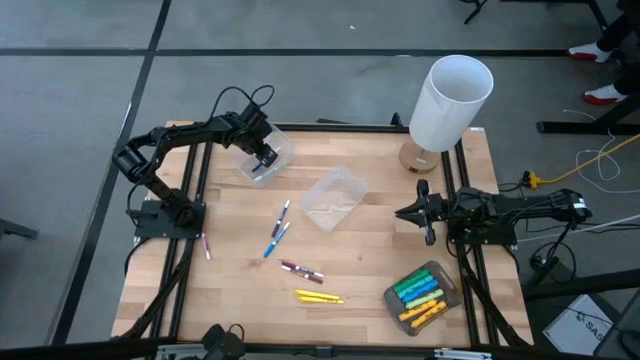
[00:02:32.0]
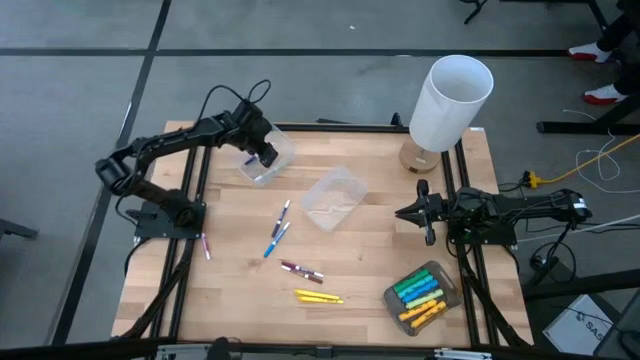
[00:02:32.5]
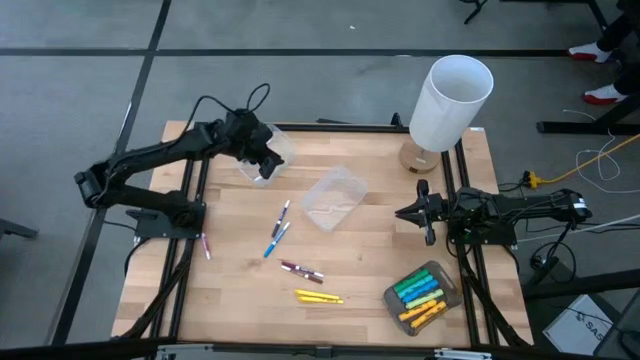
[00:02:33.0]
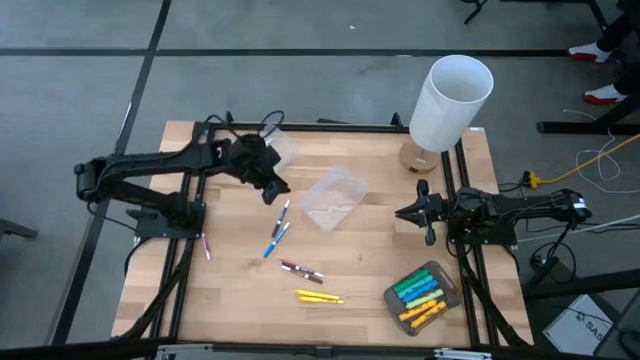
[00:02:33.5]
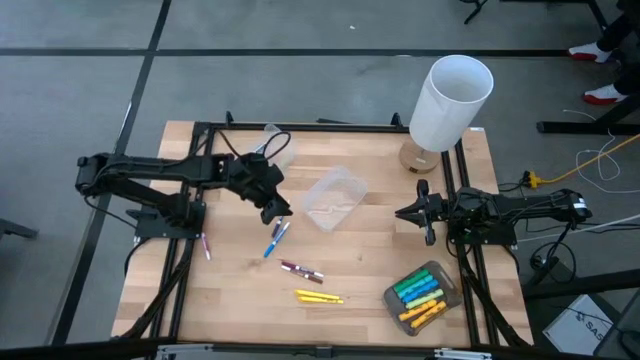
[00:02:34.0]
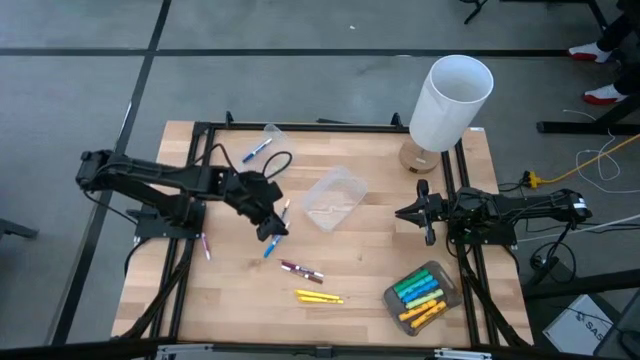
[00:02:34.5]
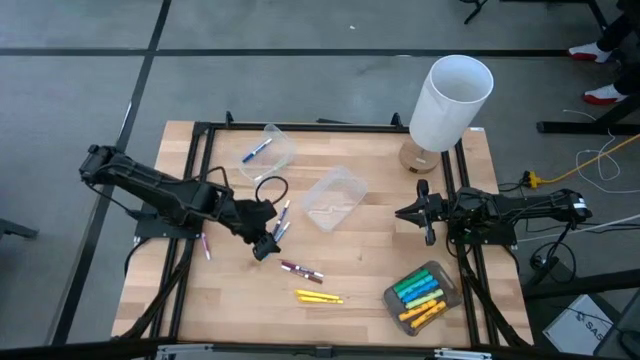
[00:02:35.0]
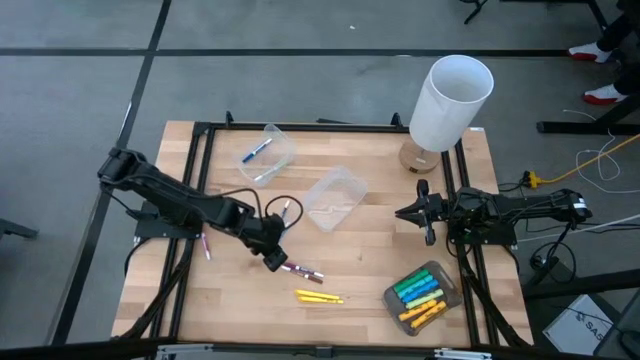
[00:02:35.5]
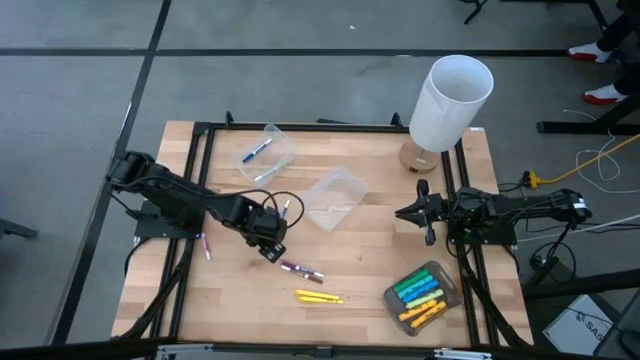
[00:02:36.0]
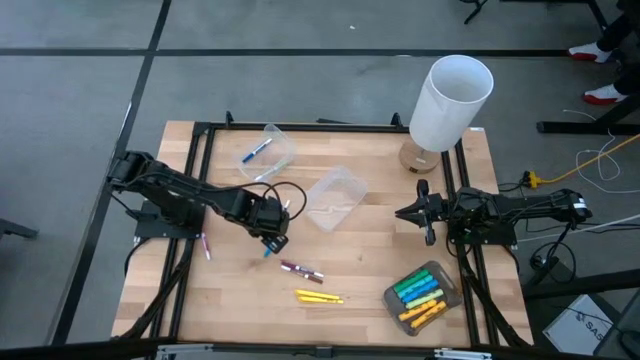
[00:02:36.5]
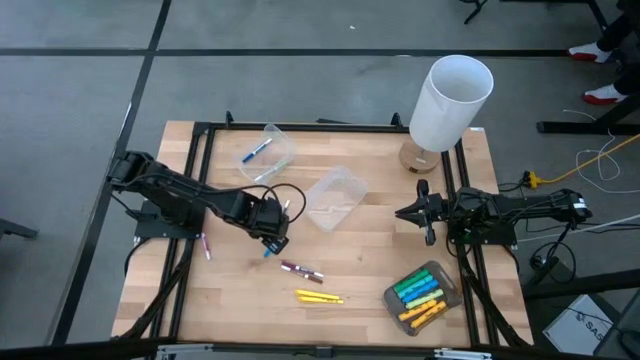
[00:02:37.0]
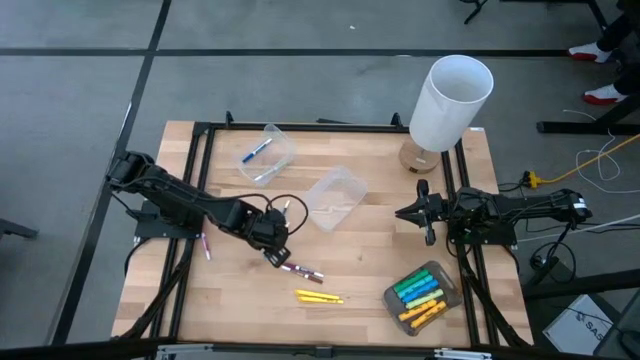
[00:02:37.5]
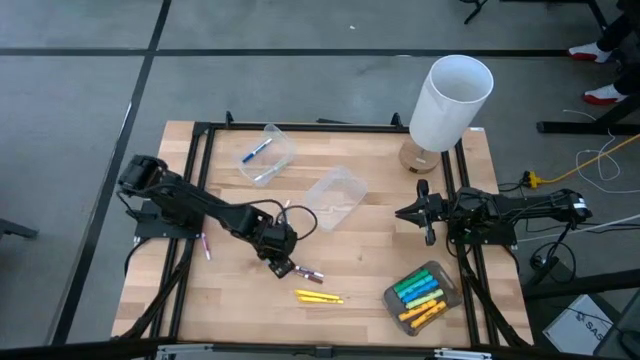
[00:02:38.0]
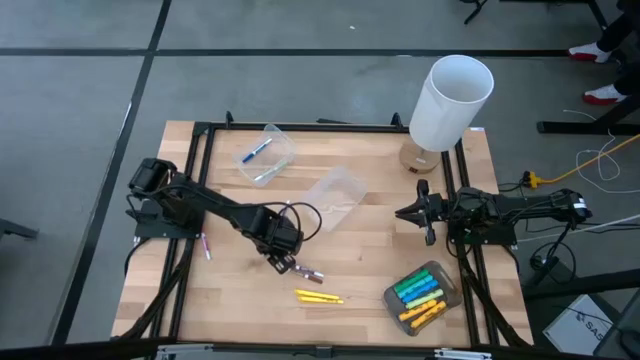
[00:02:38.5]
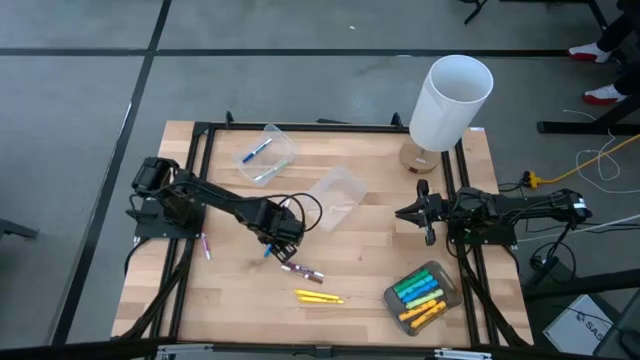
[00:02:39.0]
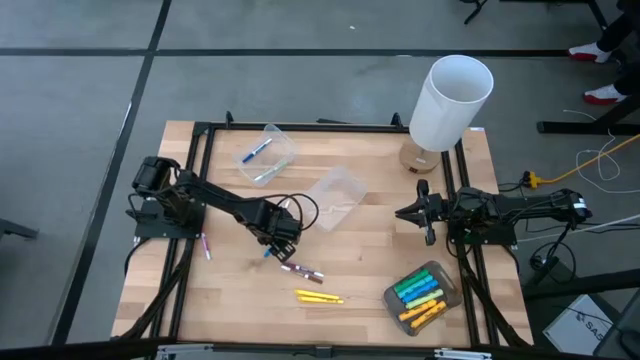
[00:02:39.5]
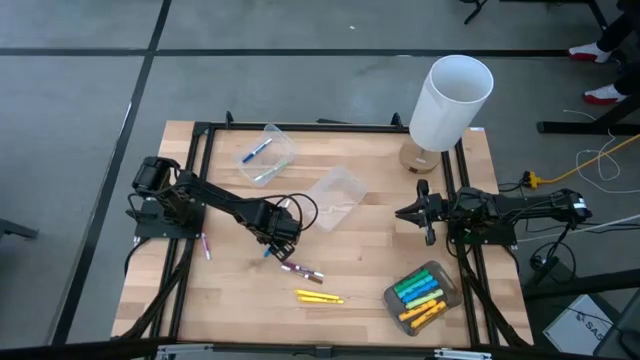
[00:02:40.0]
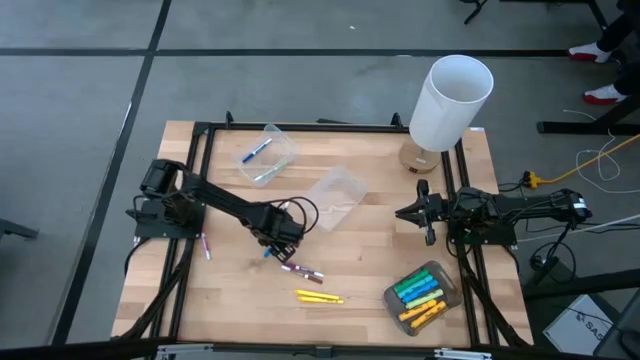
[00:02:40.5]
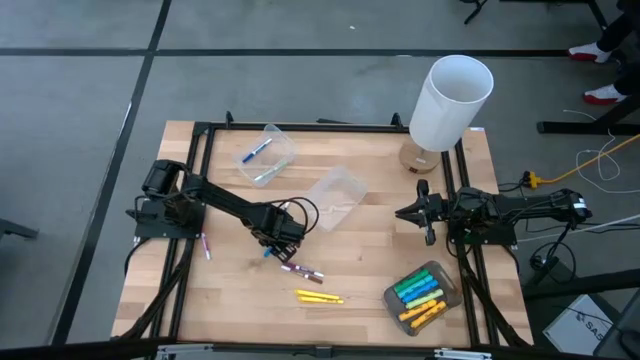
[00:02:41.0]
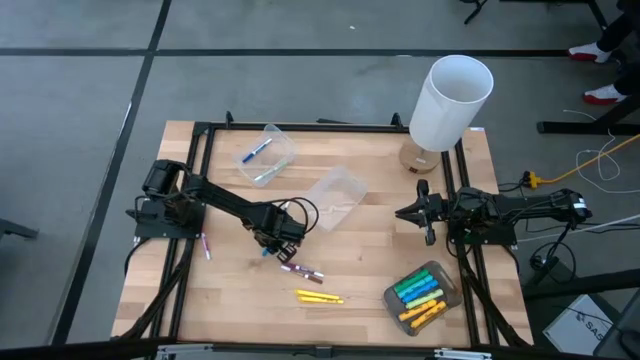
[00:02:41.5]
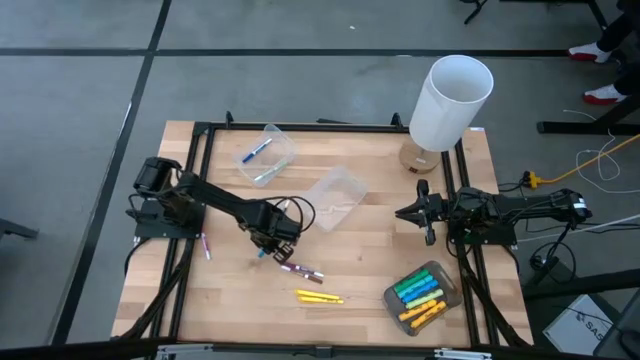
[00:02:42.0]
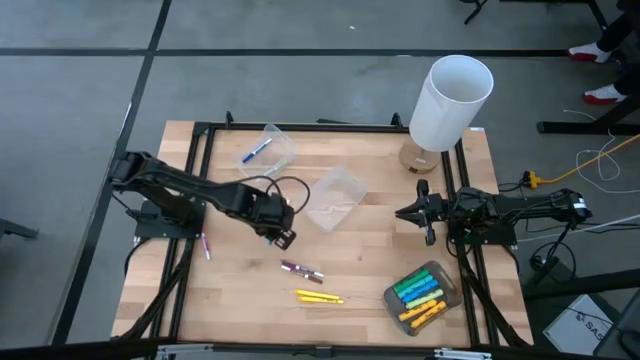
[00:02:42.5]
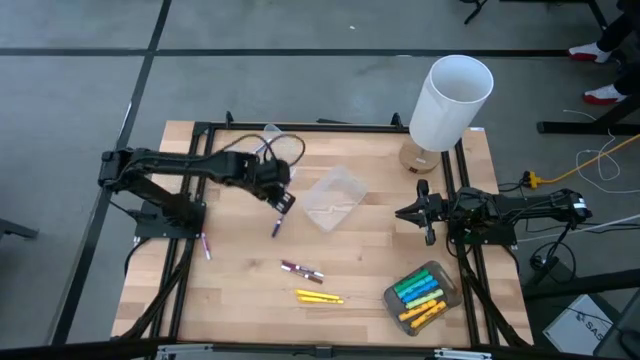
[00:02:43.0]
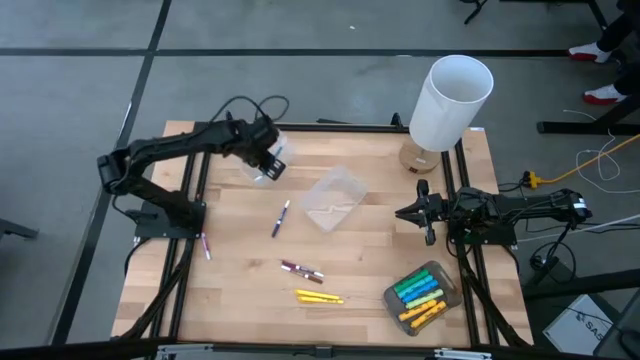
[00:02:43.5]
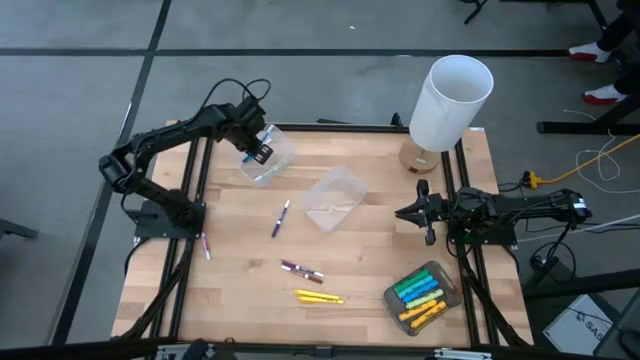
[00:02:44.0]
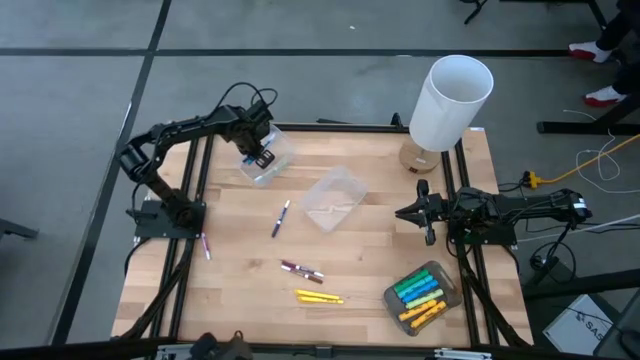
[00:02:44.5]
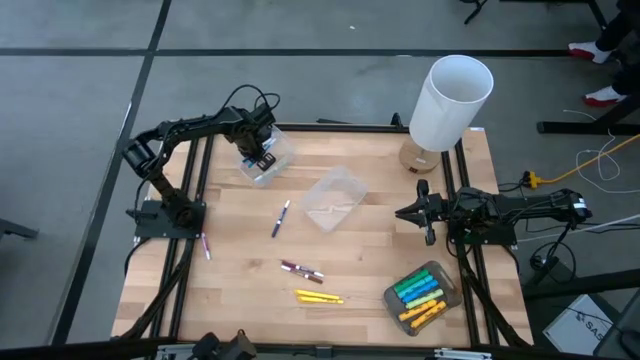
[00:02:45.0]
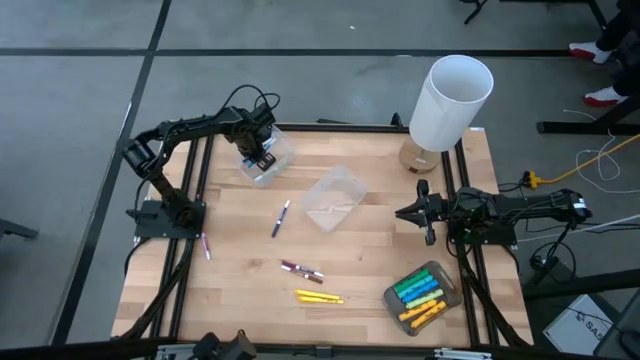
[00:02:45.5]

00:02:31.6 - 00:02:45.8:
Task: Pick & Place Markers
Put the blue marker into the transparent bin

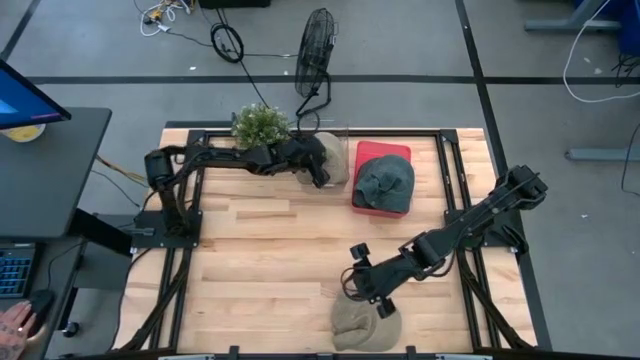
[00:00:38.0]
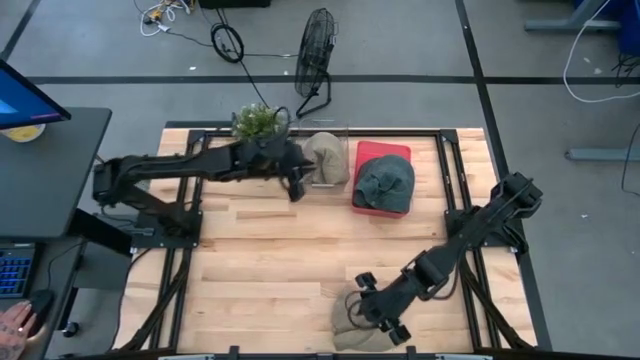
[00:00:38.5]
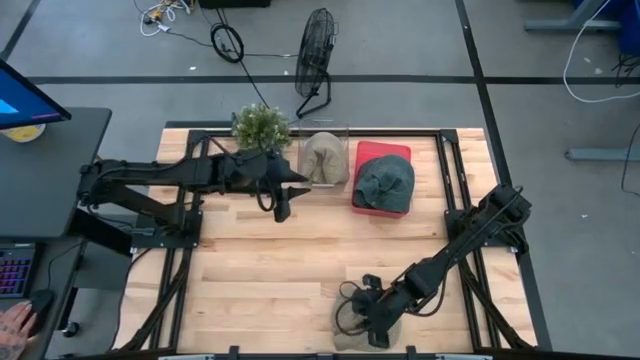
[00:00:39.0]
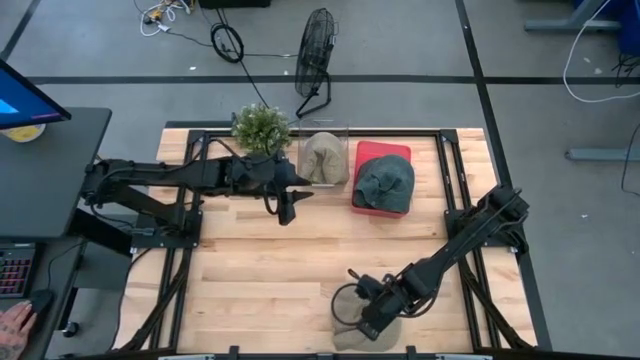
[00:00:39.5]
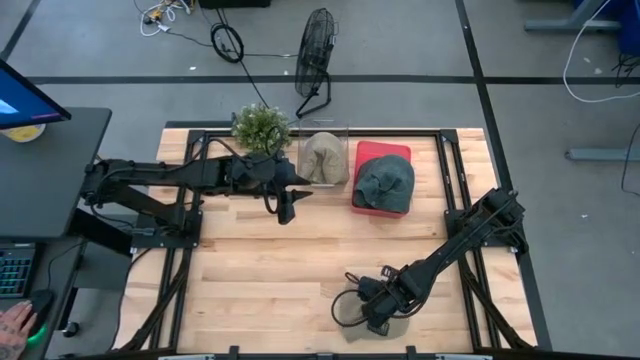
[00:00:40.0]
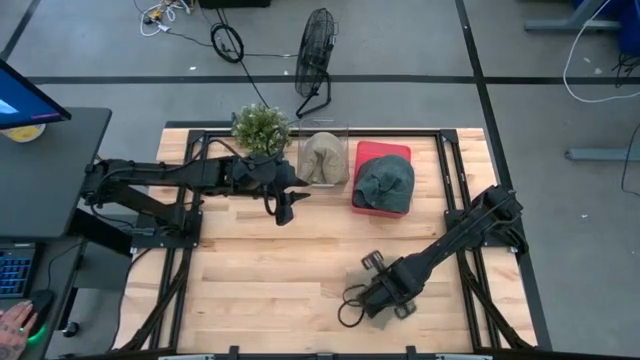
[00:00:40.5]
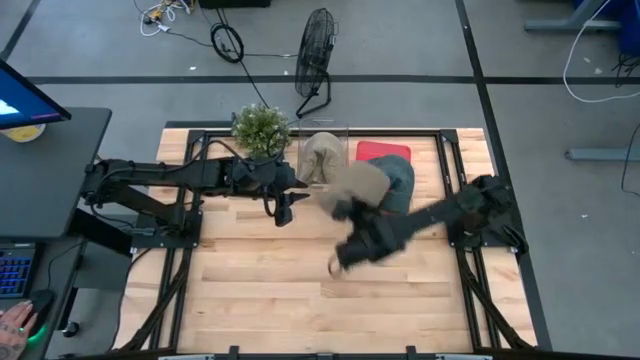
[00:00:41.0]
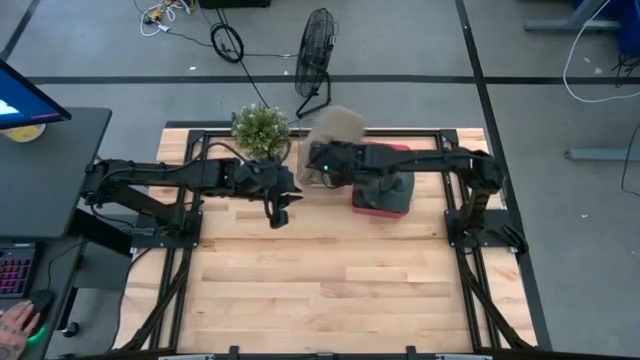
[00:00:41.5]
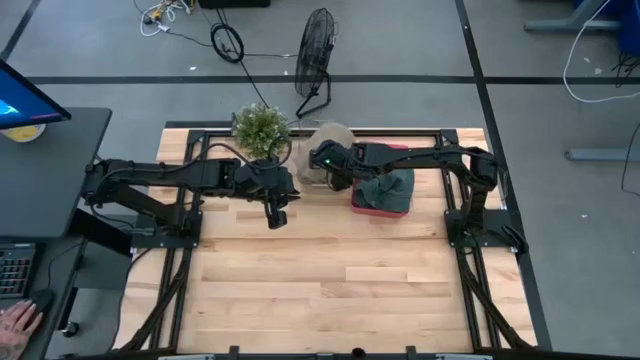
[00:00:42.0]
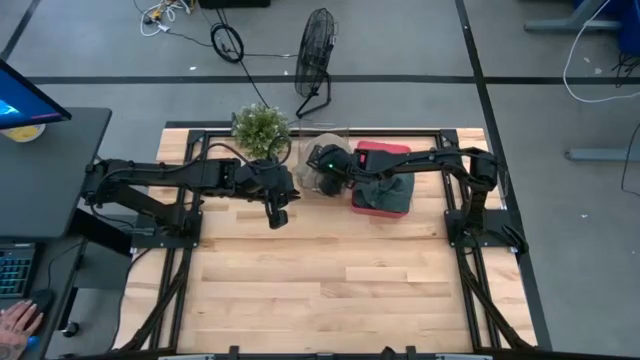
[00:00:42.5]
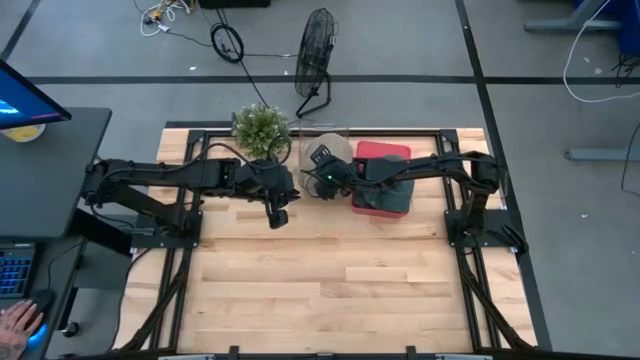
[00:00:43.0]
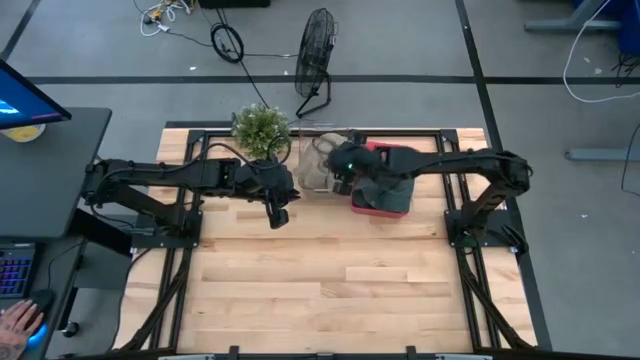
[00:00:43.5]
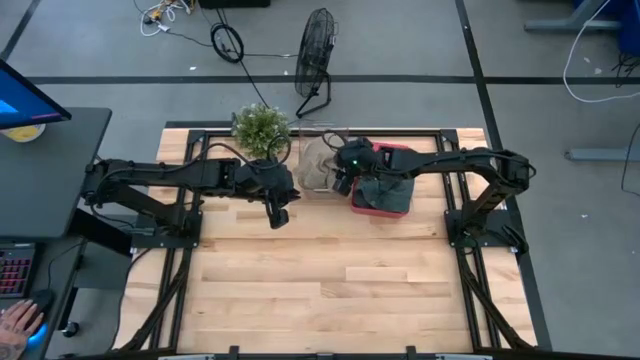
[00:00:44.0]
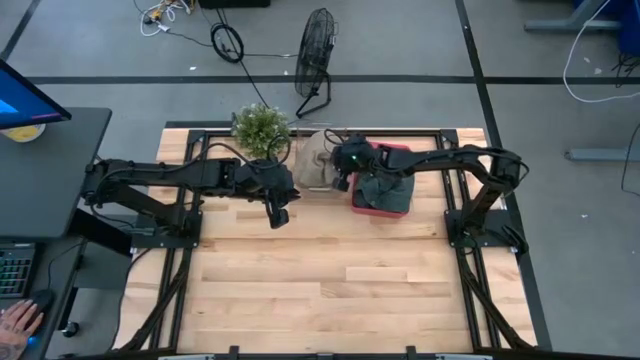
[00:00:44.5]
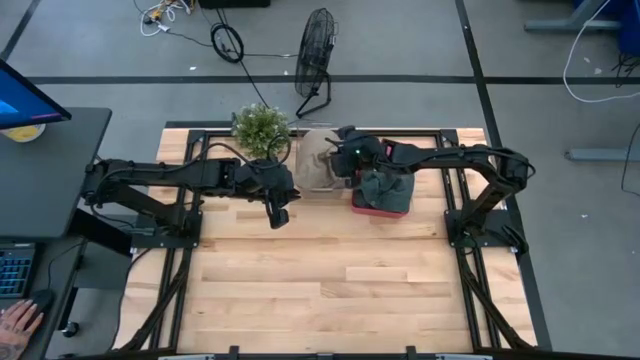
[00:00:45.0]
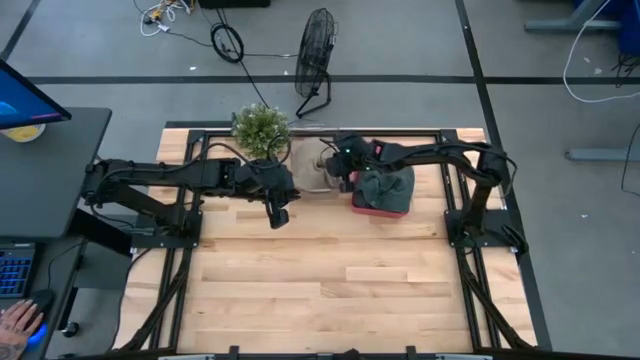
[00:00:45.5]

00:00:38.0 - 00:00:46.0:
Task: Pick & Place hat
Put the brown cap into the transparent bin
